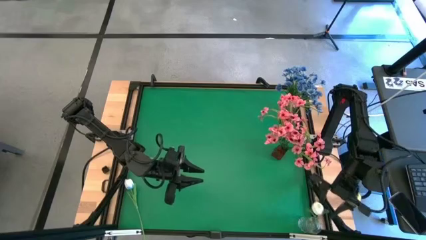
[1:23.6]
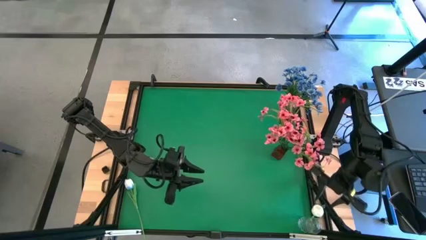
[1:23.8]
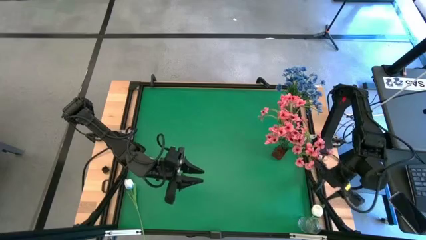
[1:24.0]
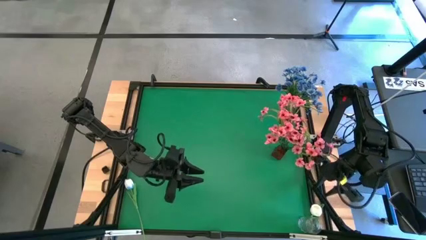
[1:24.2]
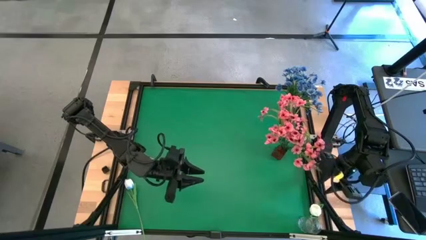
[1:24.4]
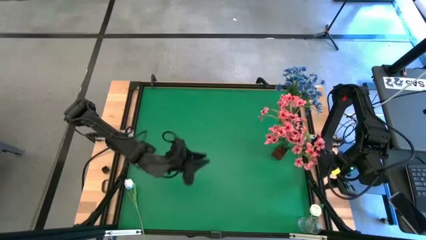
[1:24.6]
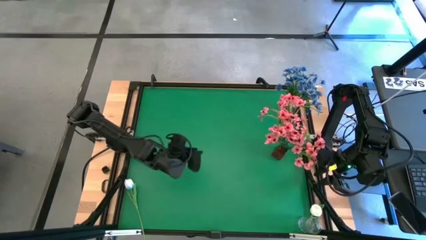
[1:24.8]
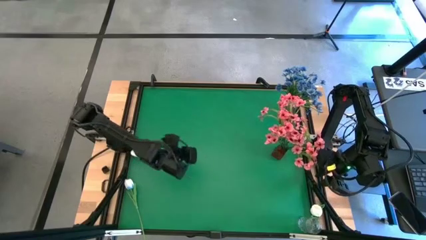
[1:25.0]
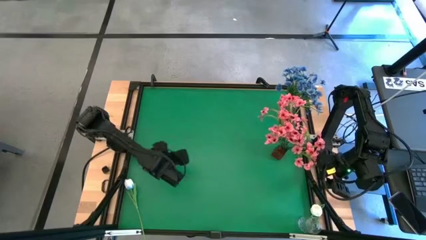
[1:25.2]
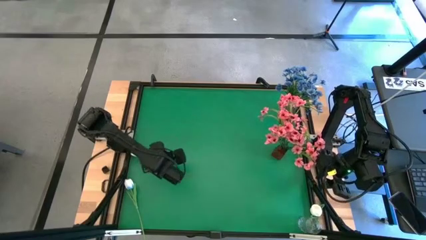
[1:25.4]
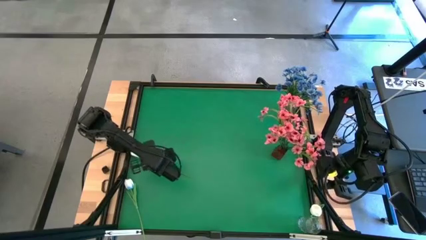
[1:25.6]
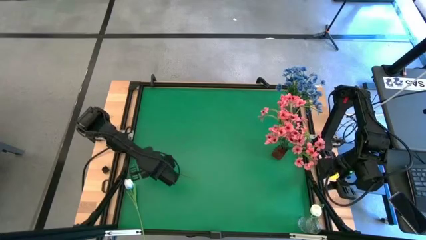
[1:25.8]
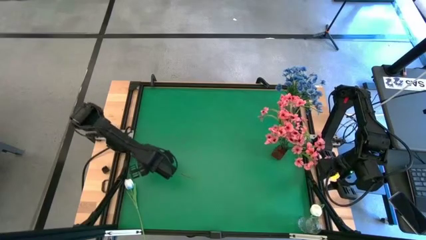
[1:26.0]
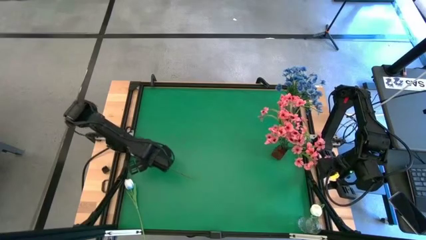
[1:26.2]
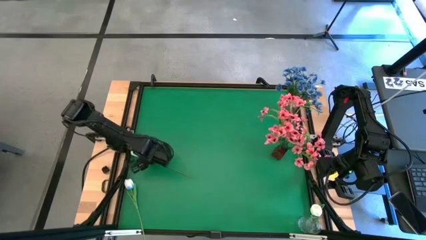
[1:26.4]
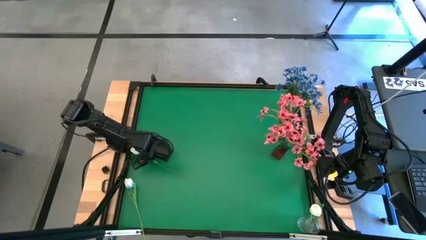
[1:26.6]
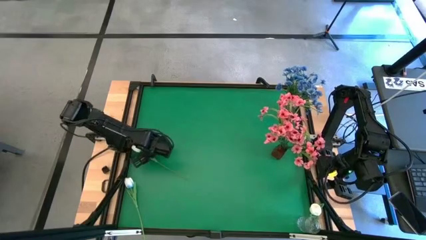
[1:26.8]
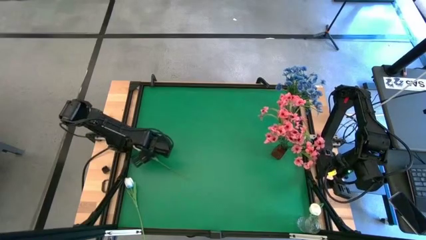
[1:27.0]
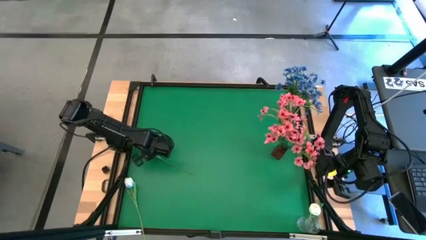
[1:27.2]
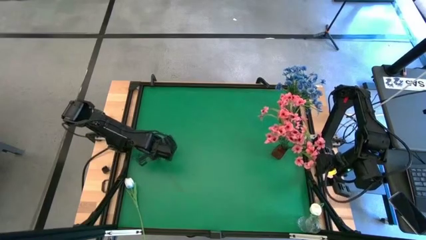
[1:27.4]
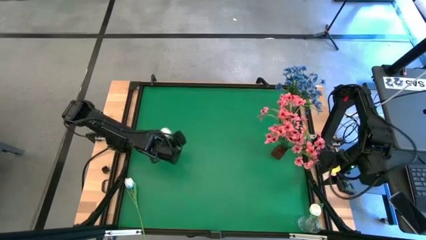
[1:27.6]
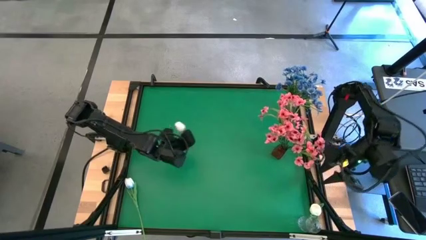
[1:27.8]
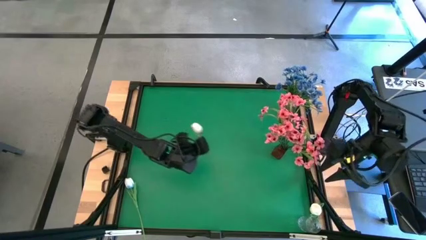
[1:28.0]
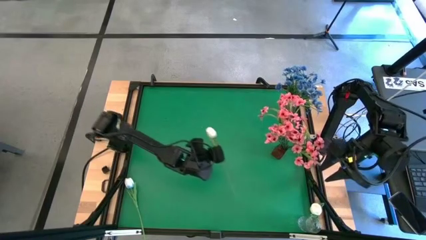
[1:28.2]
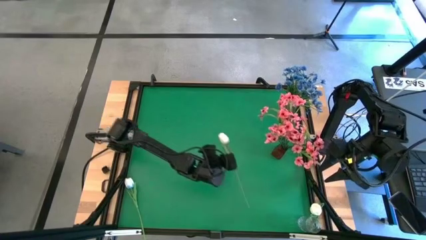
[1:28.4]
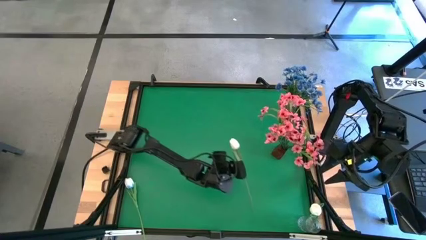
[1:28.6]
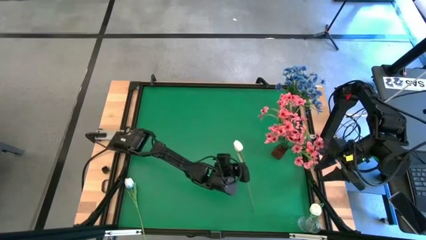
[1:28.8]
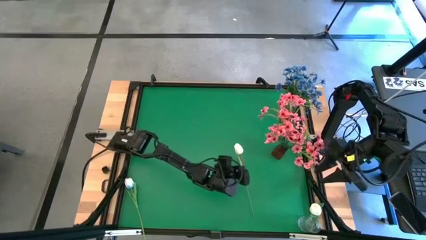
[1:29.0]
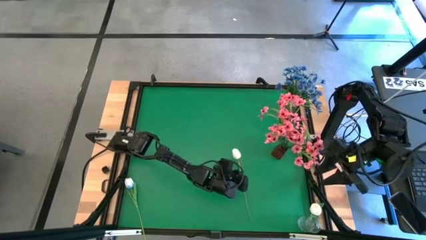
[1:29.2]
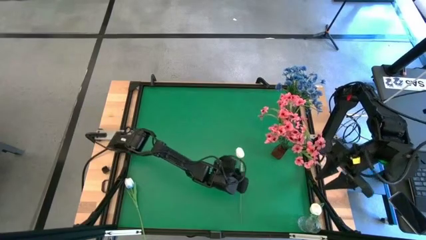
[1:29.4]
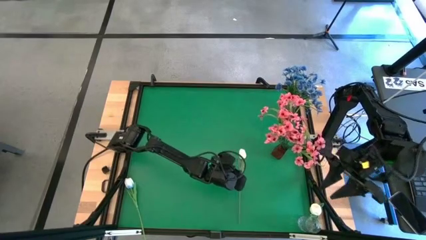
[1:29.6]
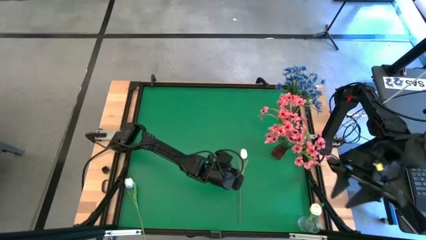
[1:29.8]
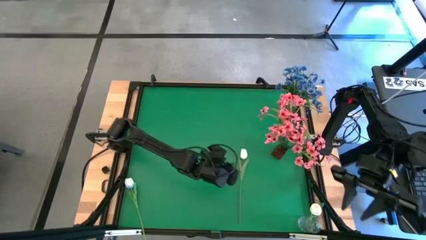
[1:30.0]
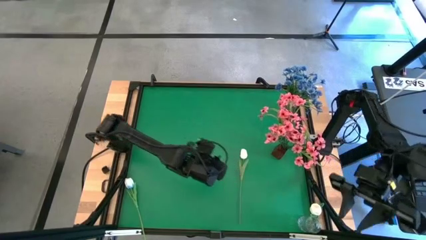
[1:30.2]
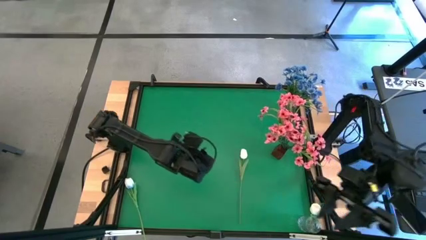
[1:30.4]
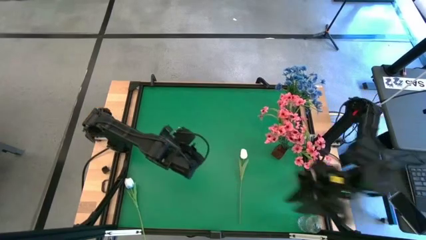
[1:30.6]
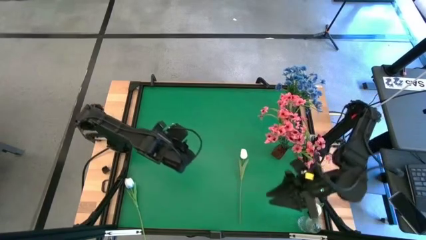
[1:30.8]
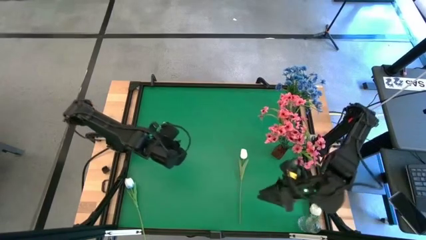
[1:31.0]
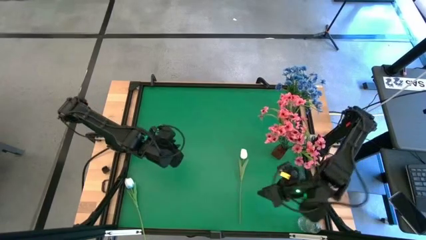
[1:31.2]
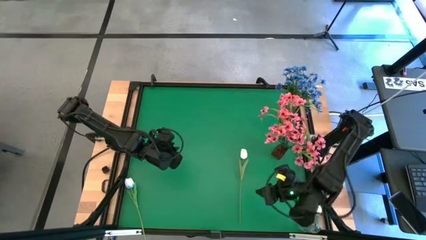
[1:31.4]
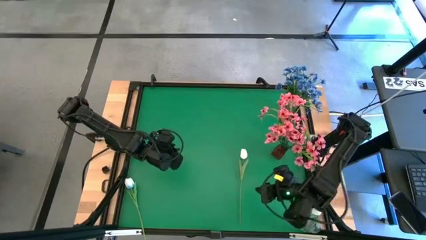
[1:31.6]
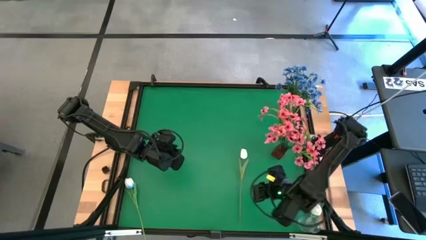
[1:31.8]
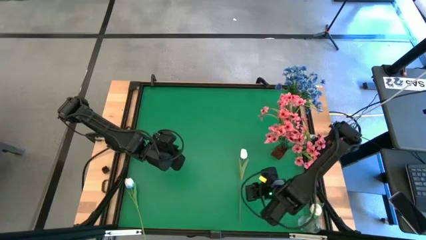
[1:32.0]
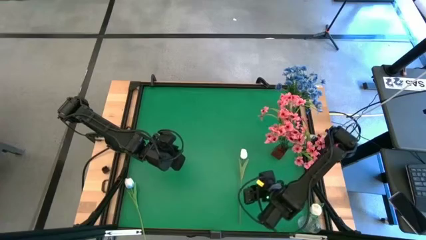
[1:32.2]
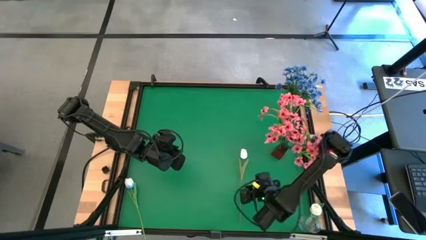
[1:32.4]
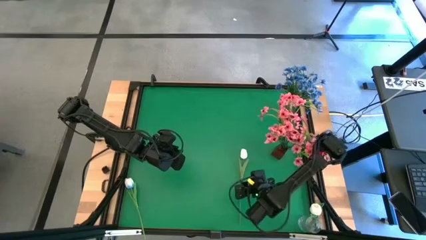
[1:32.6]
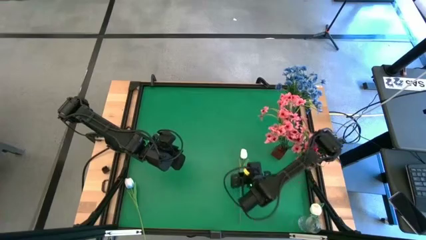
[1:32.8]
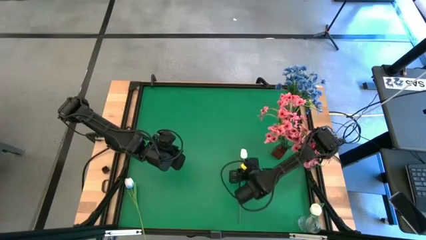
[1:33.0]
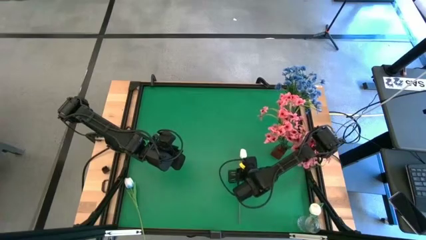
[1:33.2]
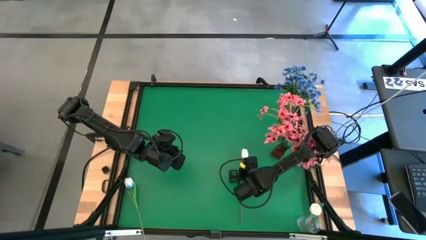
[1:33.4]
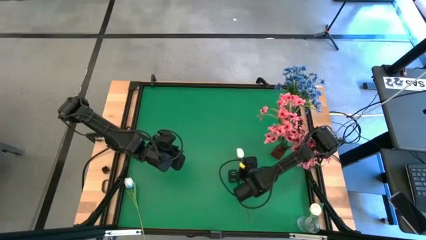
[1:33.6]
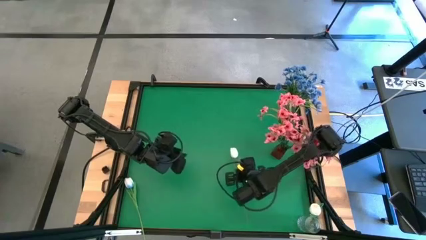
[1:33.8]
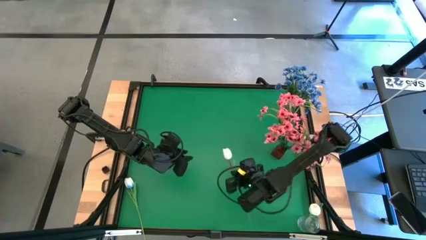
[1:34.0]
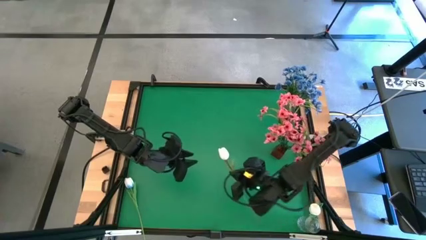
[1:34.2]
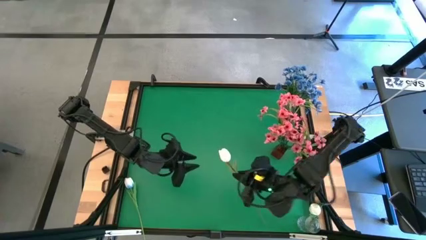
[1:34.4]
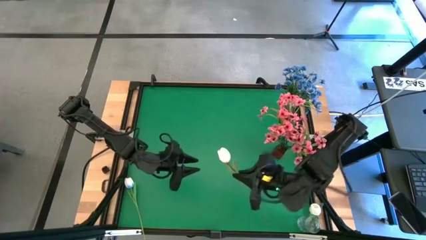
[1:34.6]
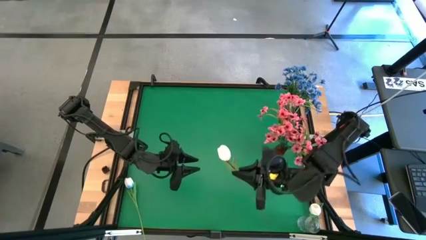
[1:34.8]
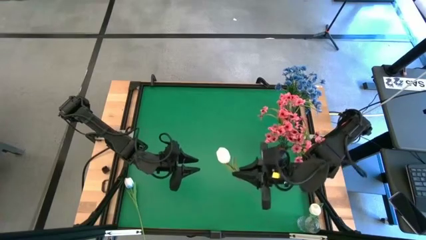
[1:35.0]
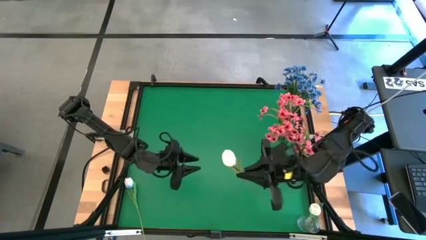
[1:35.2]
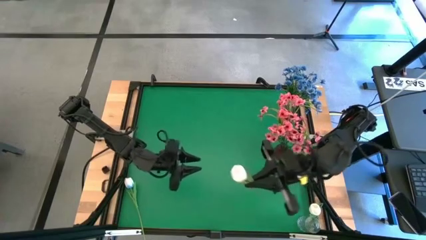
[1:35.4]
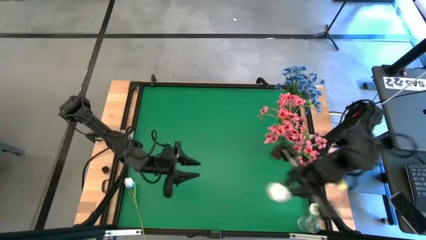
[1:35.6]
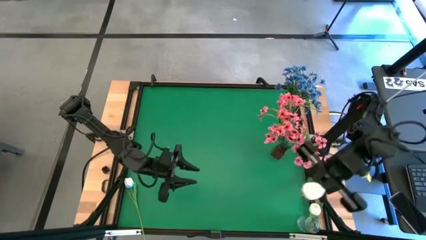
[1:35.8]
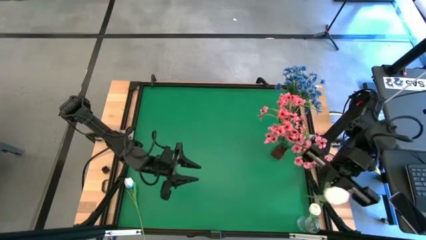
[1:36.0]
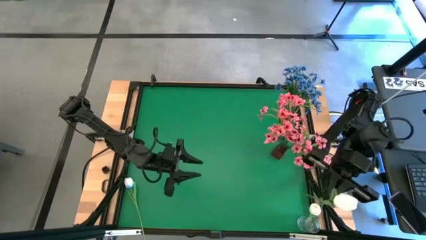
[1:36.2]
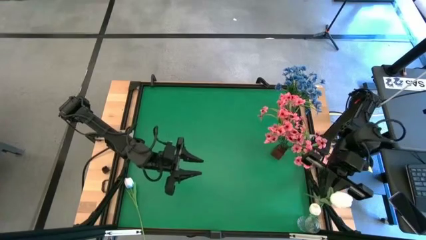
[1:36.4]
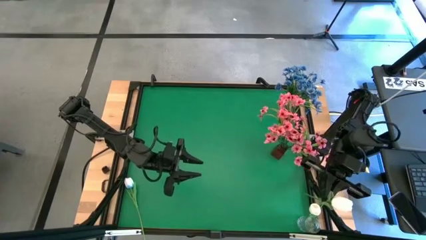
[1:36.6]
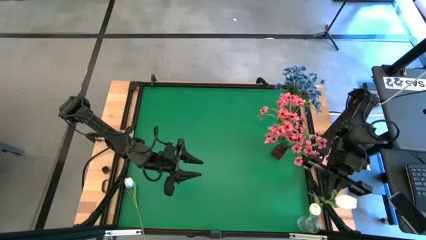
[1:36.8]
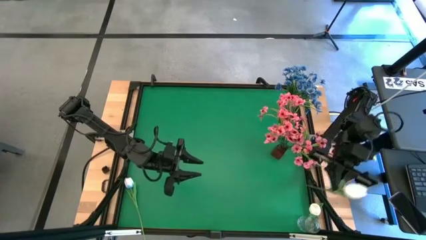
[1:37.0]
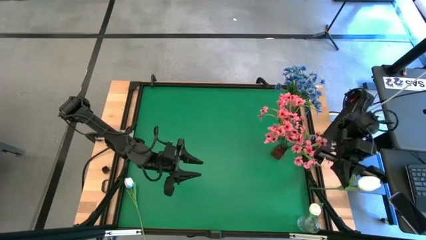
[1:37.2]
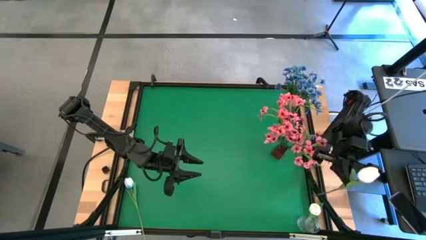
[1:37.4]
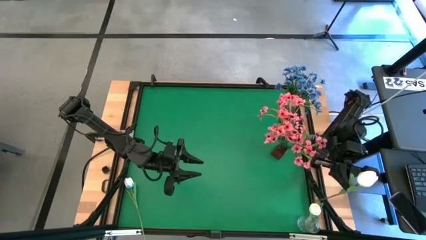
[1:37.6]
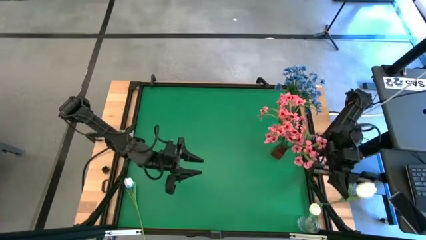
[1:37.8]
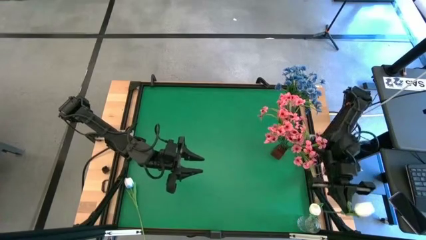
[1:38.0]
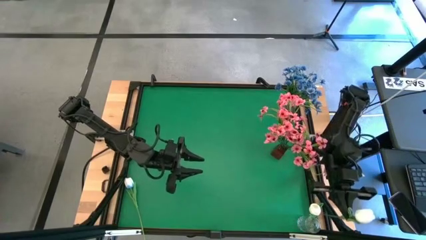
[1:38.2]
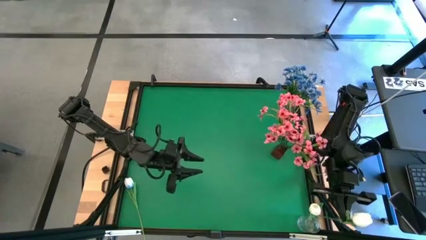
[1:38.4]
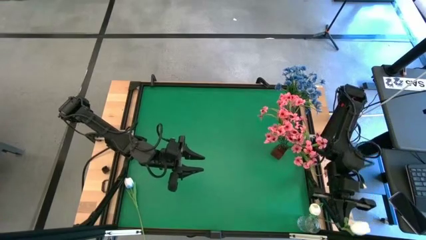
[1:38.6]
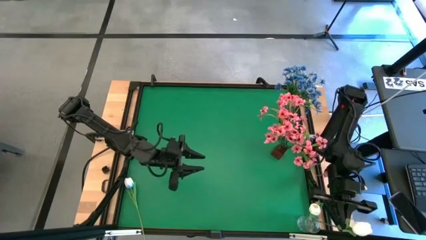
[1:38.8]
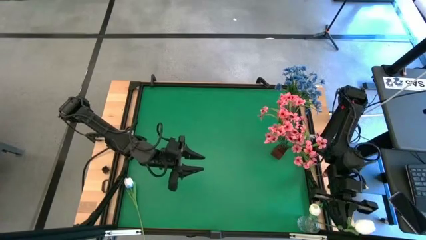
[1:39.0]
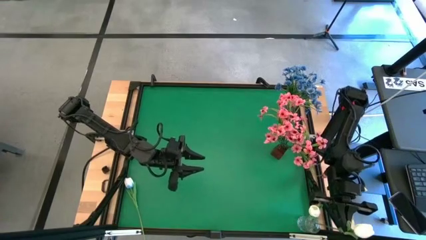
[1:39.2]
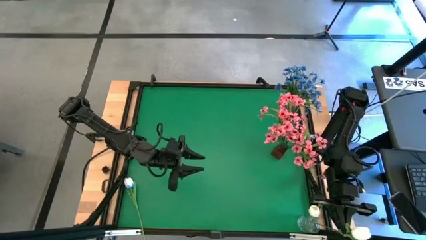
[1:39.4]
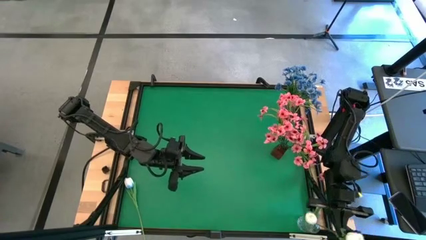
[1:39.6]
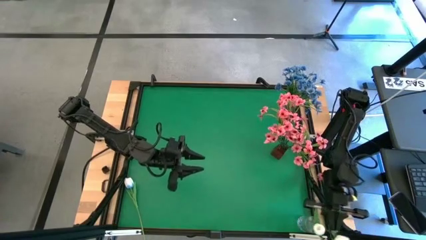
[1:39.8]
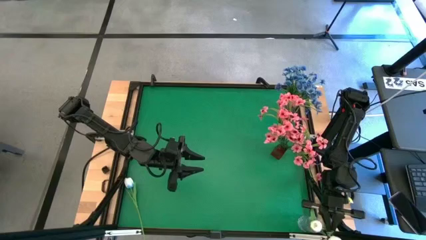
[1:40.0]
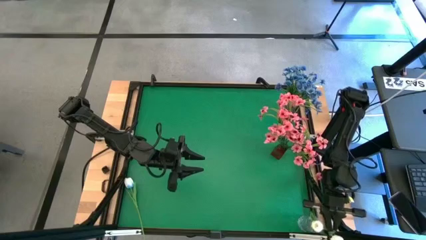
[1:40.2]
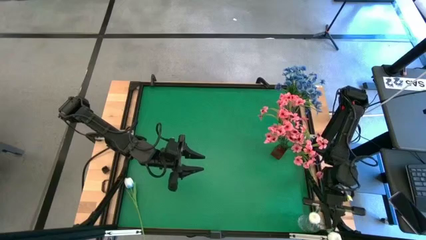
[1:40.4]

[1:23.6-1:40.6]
Task: Sort flowers into vase by color
Put the top white flower into the transparent vase
